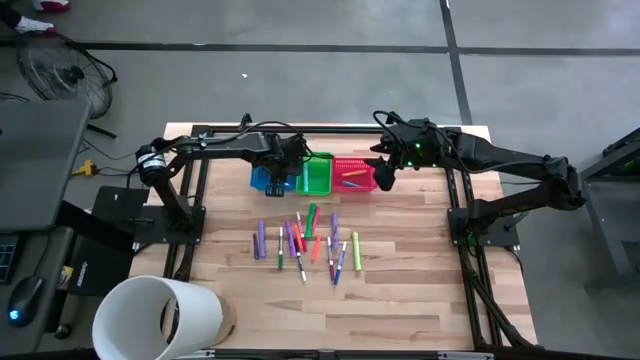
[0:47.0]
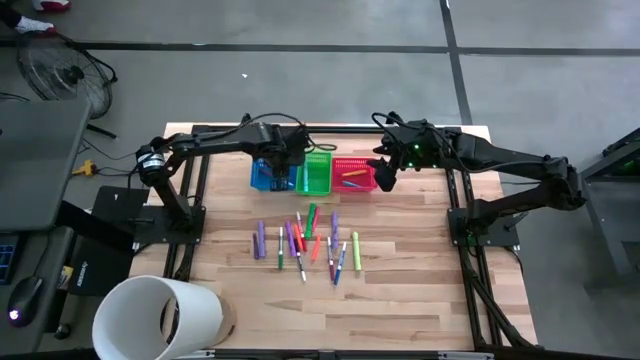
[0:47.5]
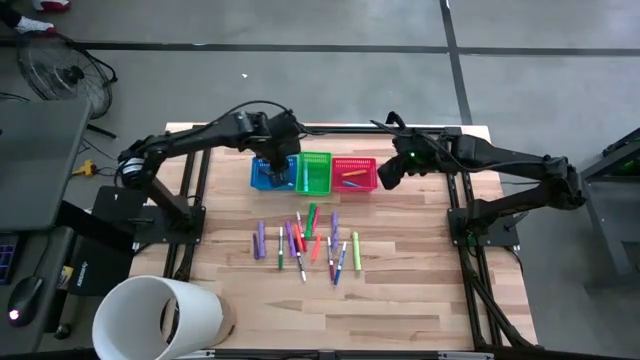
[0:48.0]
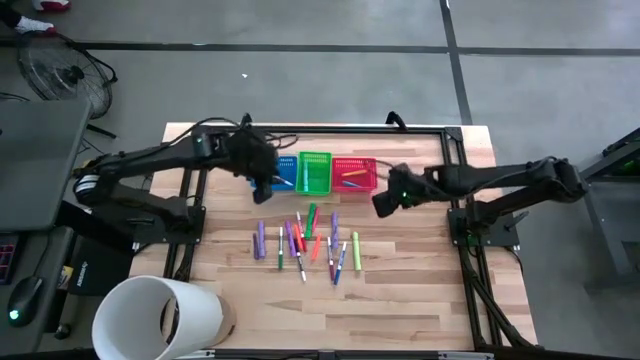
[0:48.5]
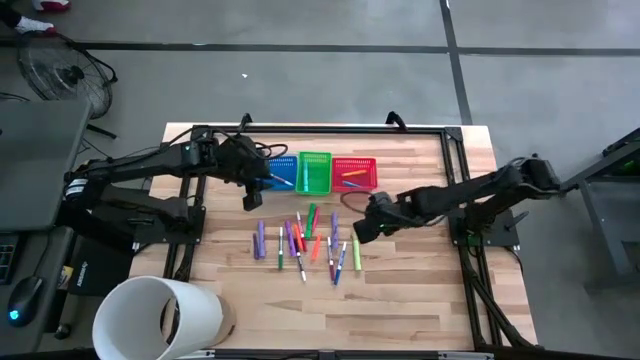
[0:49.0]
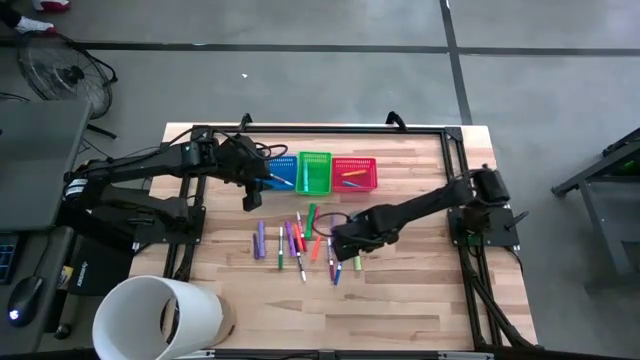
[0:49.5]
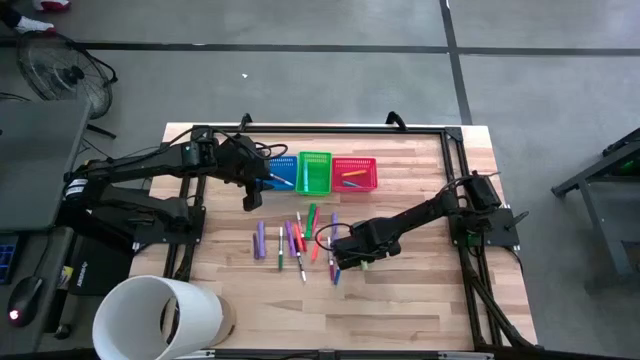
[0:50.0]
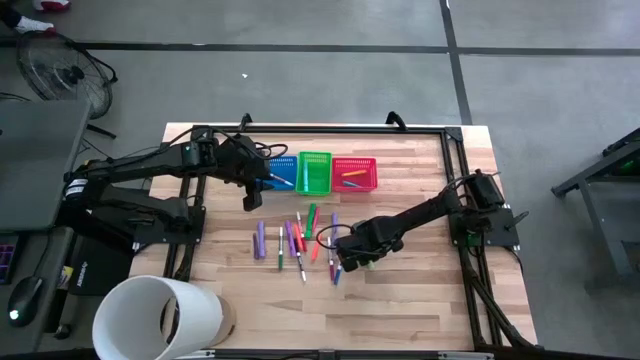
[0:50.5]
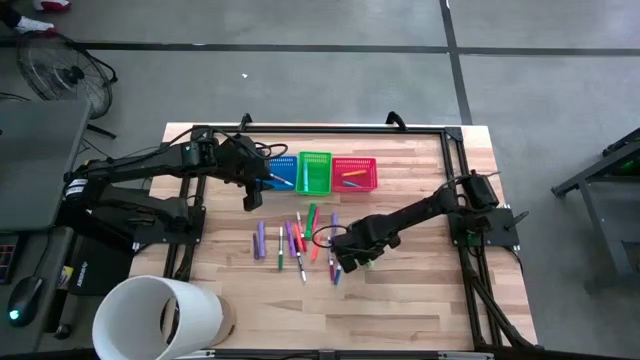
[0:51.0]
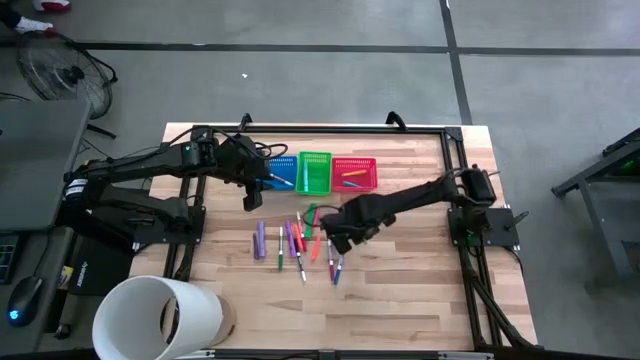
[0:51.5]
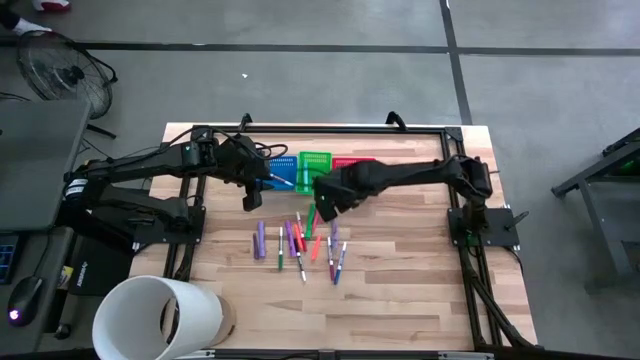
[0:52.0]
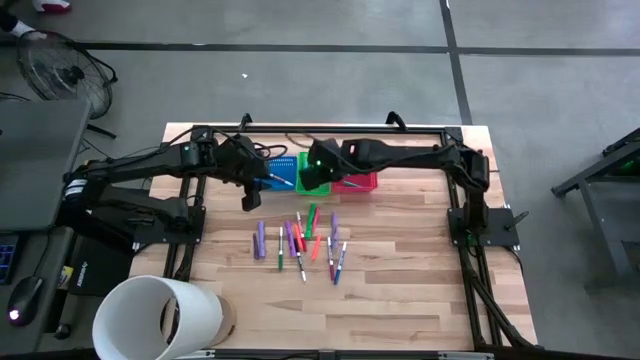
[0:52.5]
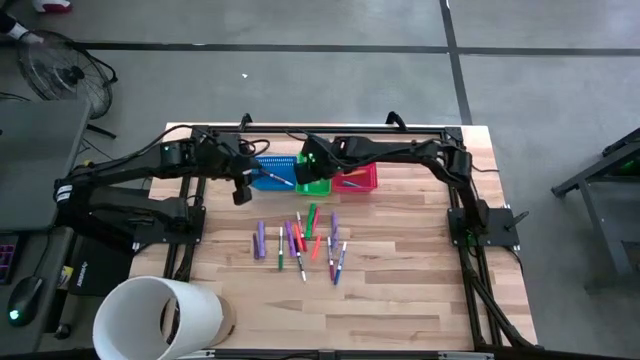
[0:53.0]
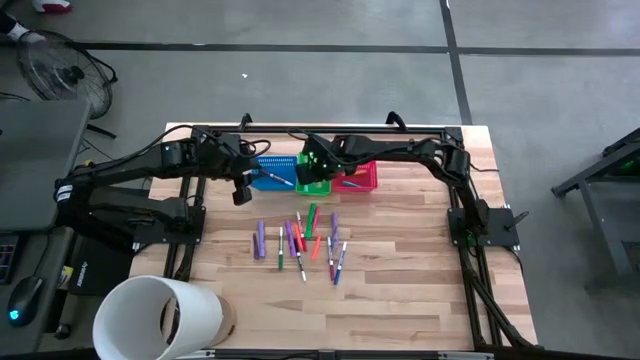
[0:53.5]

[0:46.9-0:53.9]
Task: Pick & Place Markers
Put the light green highlighter into the green bin

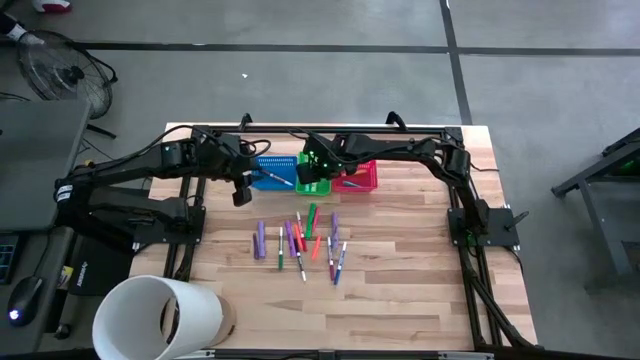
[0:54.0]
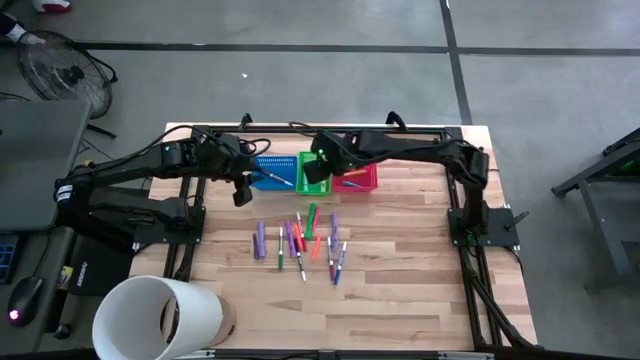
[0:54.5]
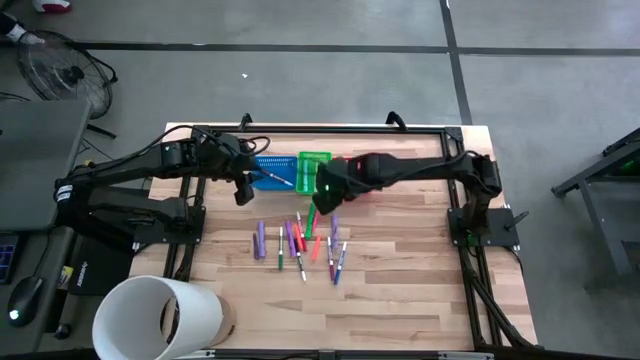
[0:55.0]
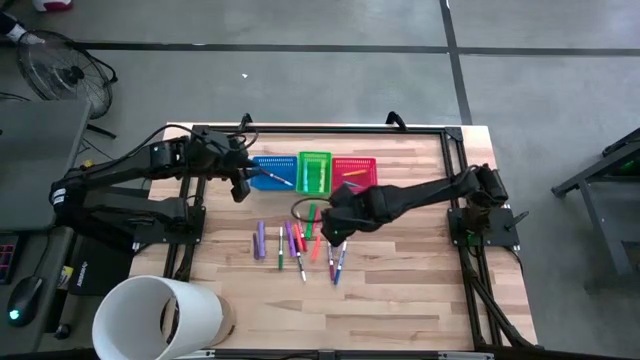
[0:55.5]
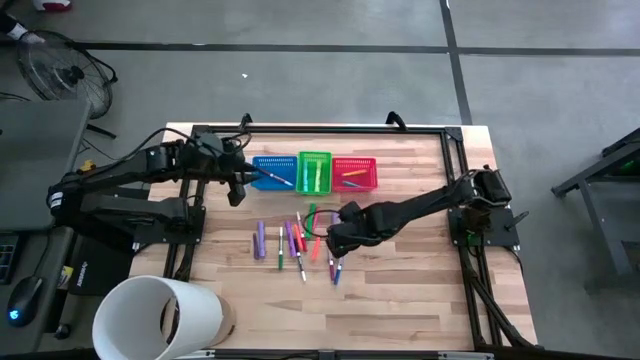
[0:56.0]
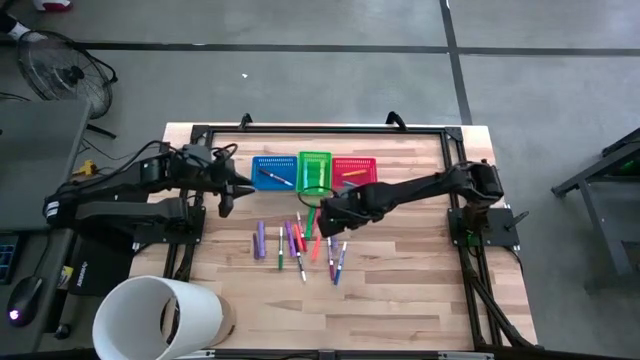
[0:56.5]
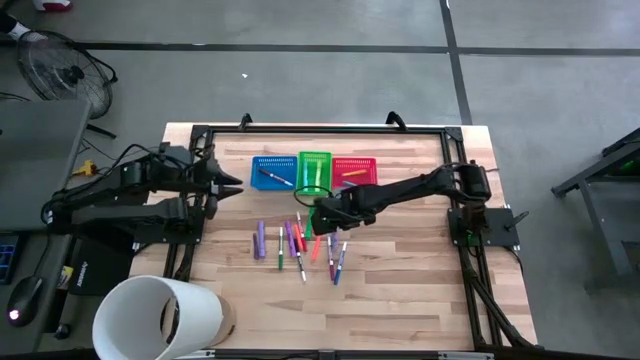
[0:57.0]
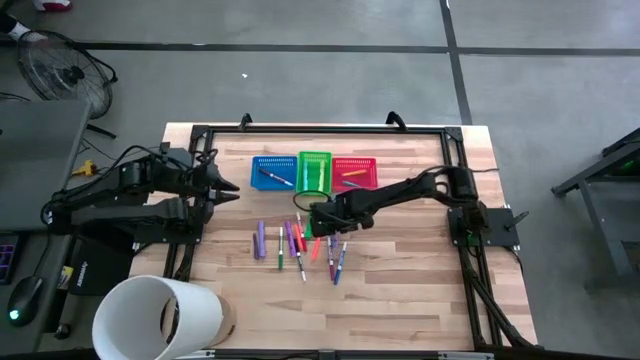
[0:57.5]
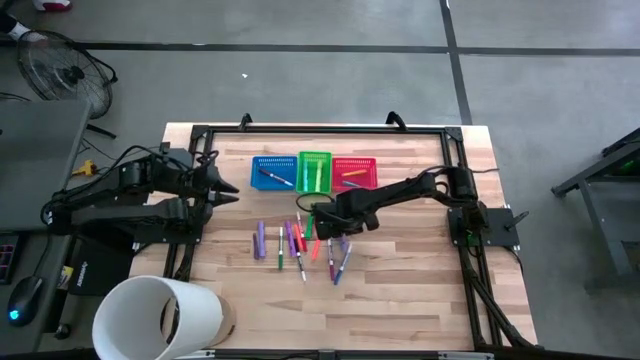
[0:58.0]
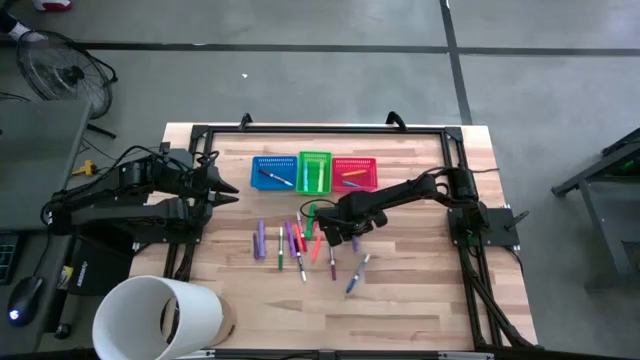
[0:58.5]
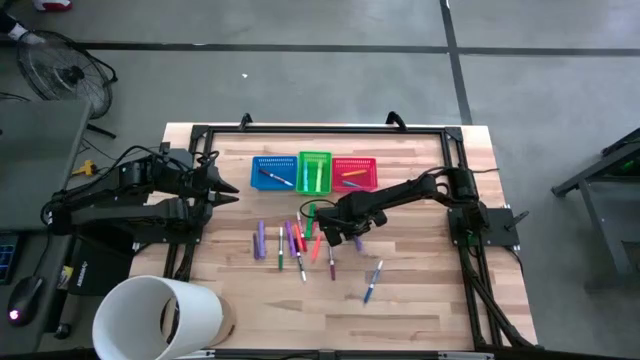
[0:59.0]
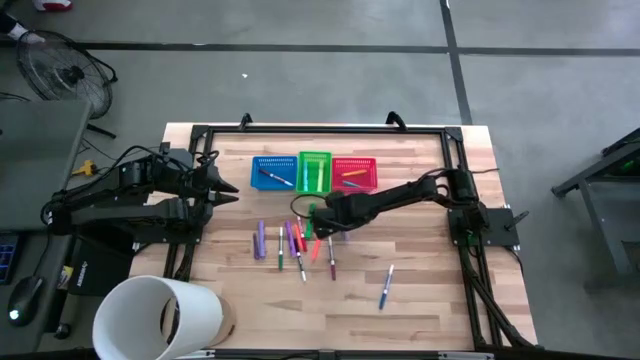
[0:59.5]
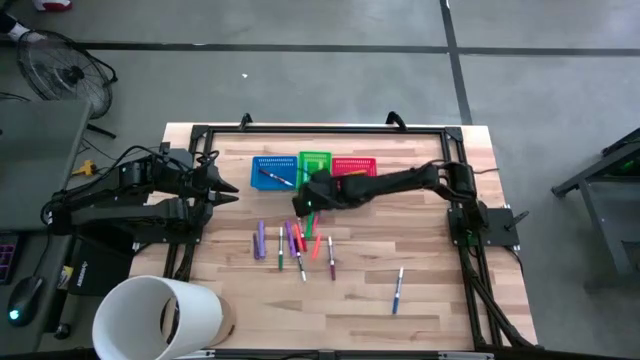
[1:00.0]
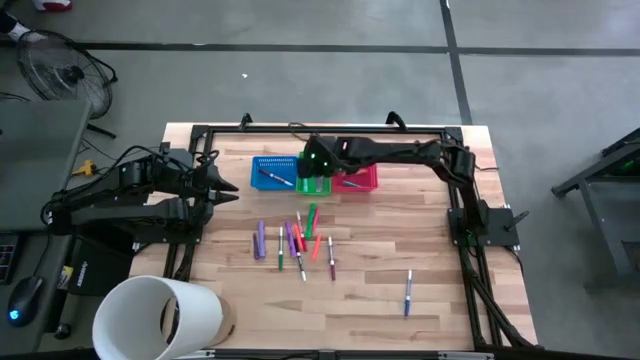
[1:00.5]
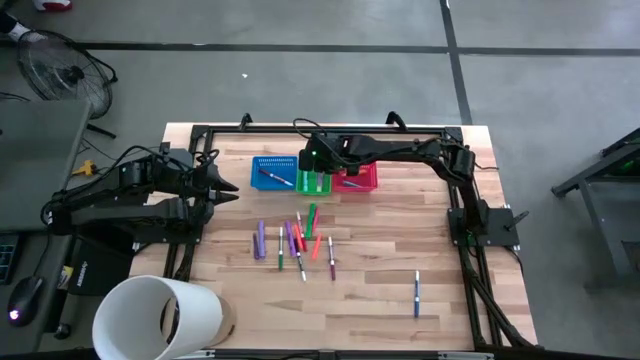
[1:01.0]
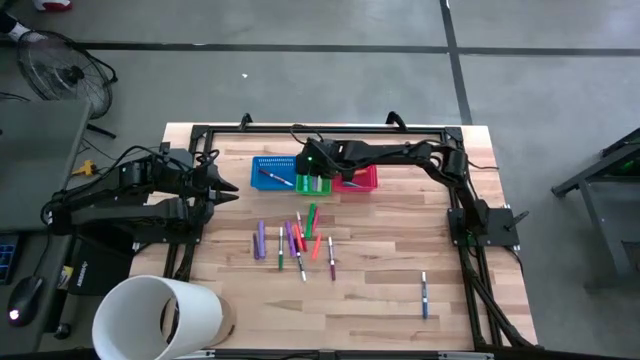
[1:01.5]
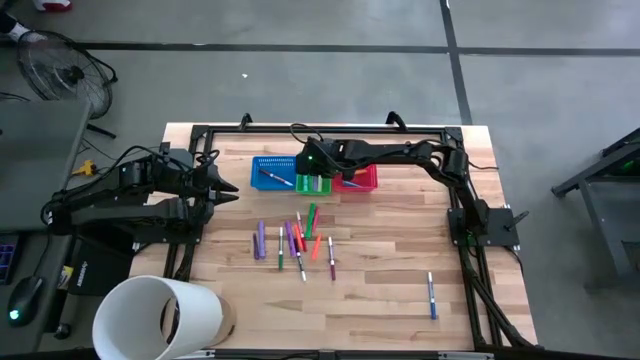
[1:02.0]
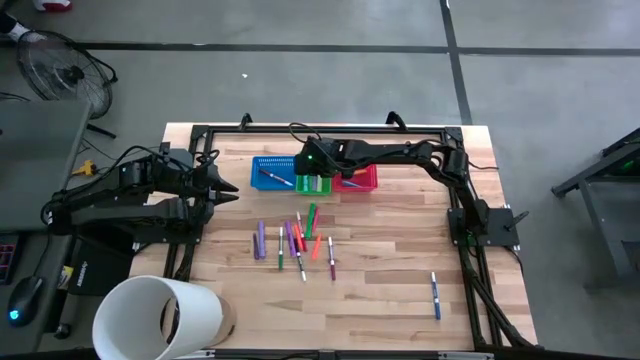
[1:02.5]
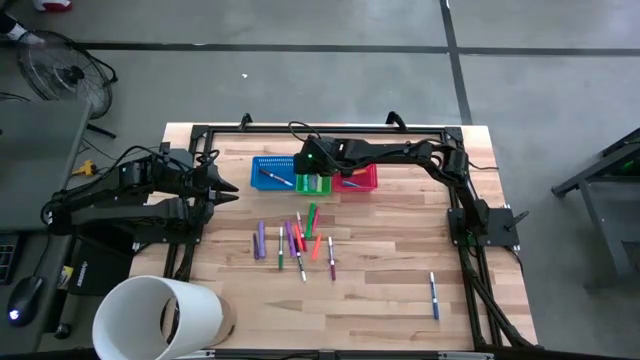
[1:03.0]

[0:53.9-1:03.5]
Put the right purple highlighter into the green bin

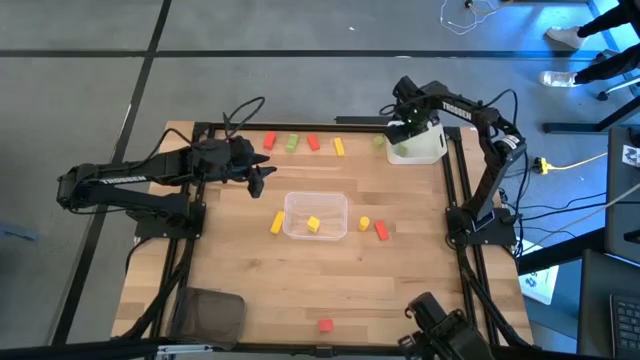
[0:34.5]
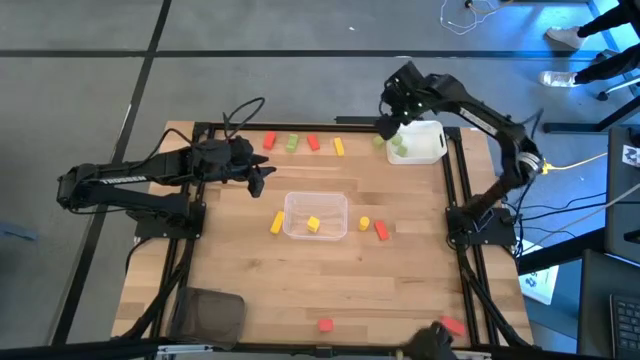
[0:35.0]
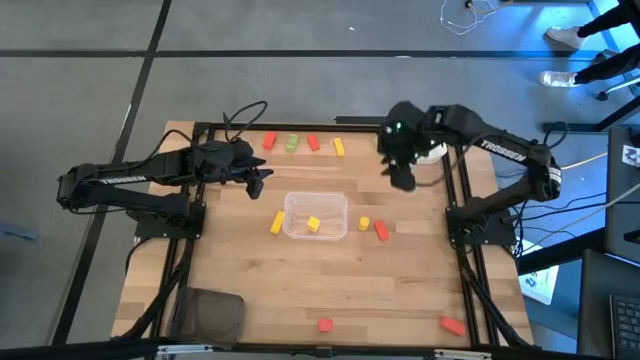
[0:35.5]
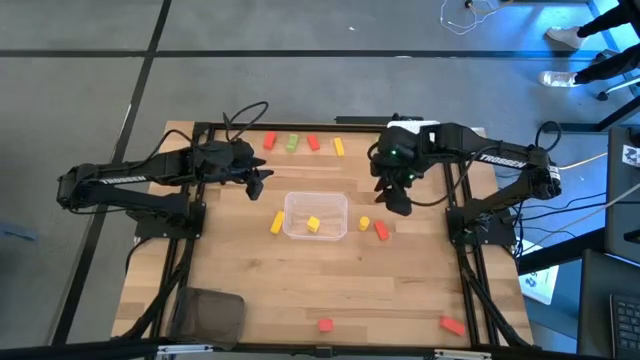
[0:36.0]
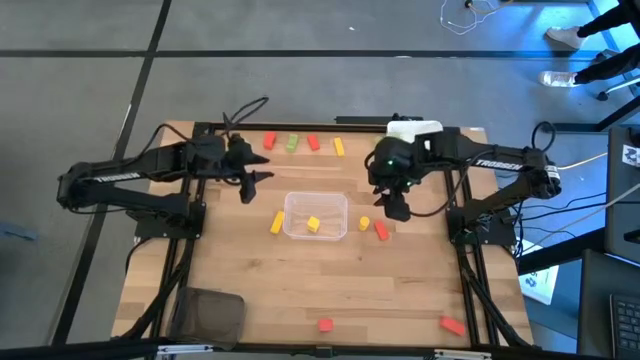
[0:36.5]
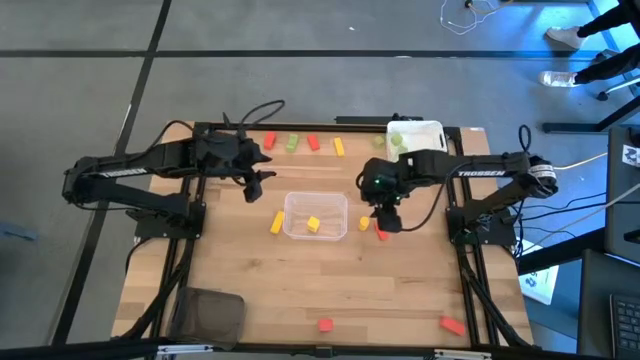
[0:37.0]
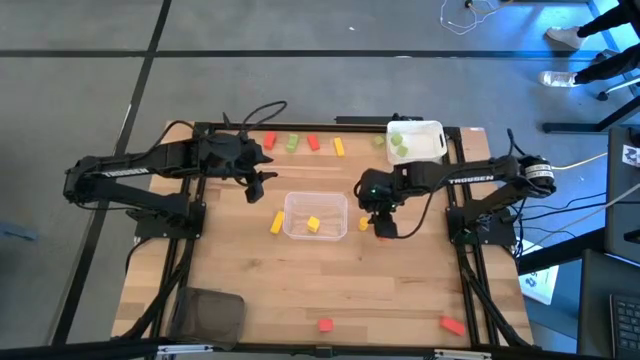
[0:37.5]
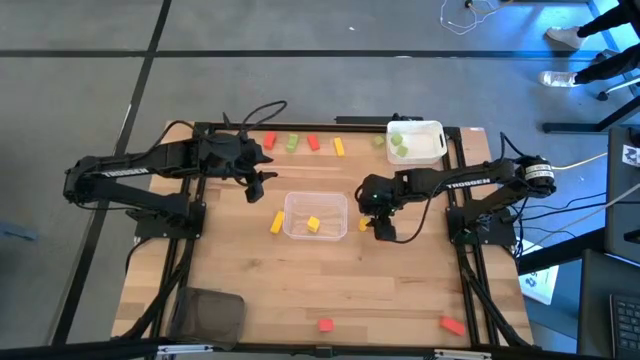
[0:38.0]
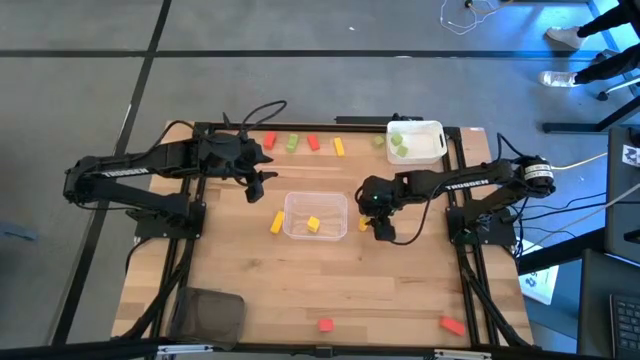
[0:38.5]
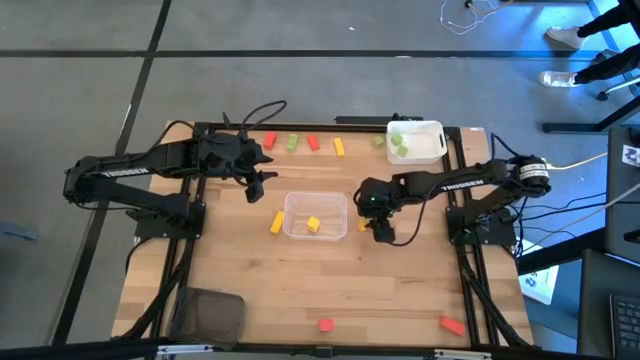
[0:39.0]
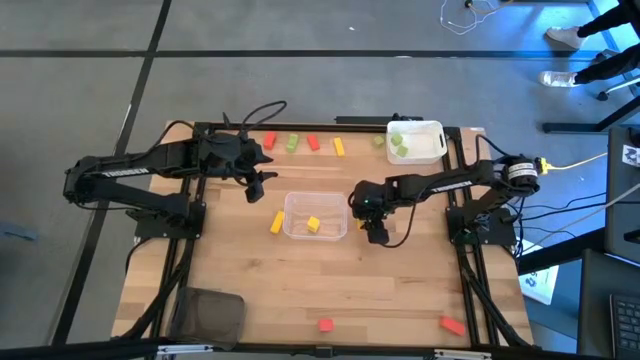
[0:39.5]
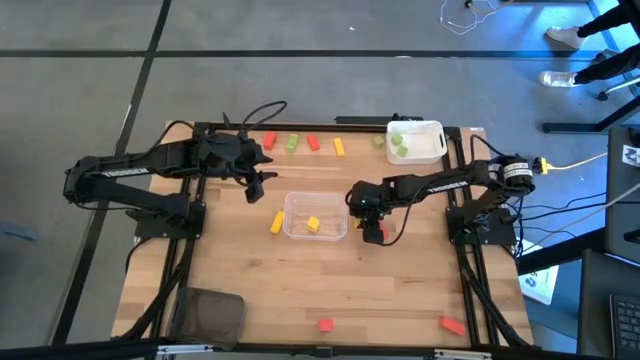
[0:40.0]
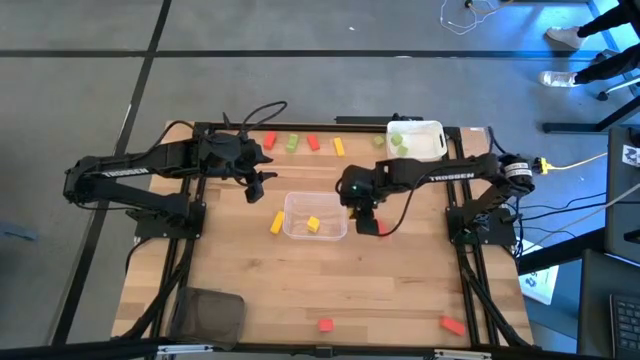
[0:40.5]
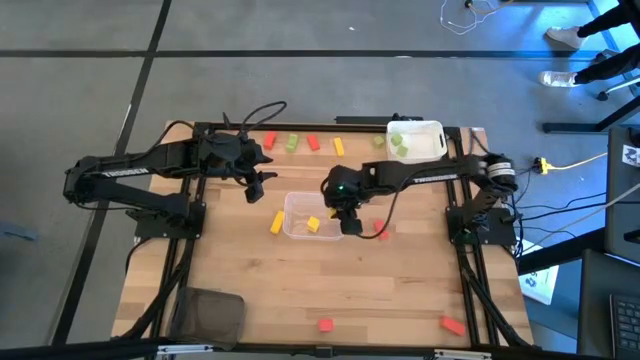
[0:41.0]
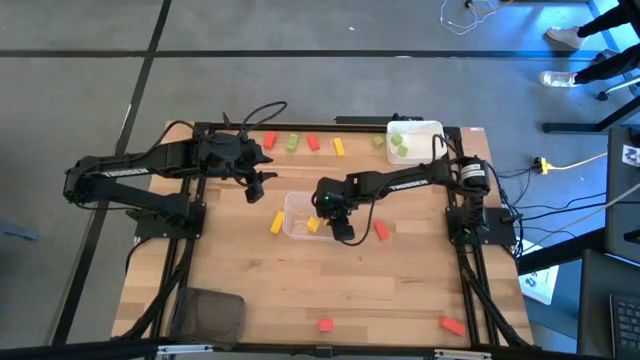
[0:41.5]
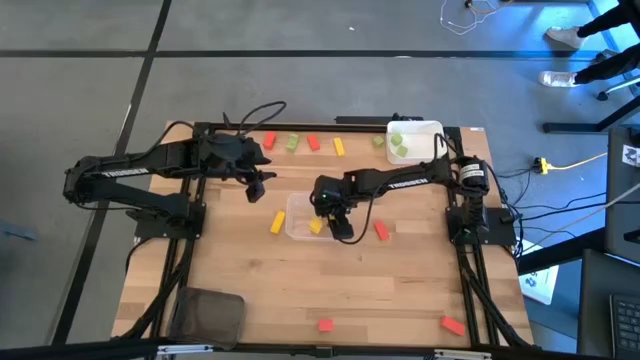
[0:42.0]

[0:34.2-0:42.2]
Task: Sort & place blocks by color
Put the yellow block into the transparent bin
